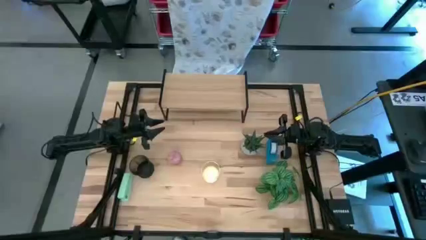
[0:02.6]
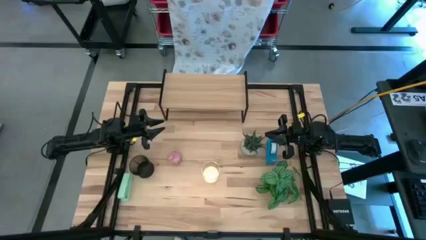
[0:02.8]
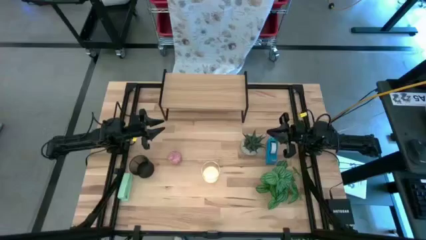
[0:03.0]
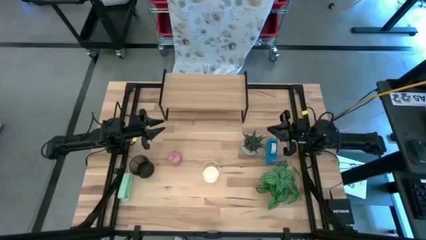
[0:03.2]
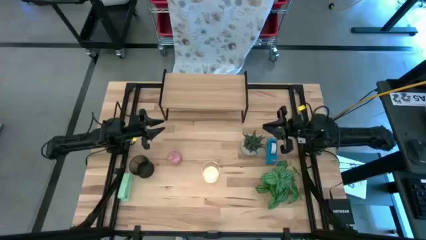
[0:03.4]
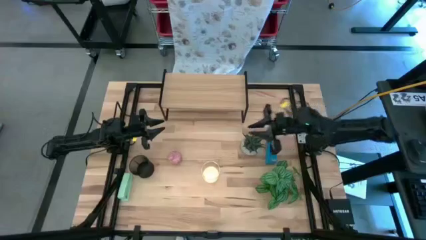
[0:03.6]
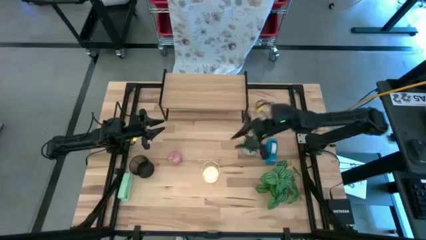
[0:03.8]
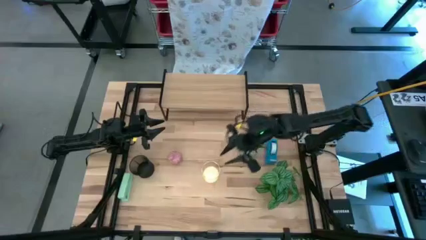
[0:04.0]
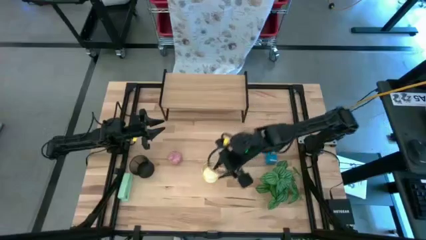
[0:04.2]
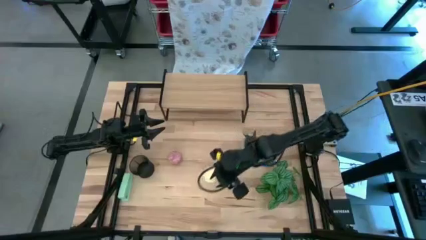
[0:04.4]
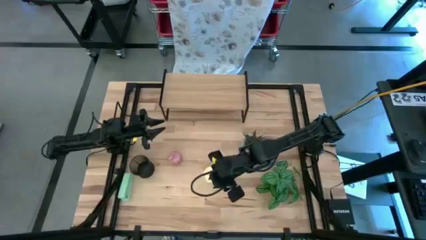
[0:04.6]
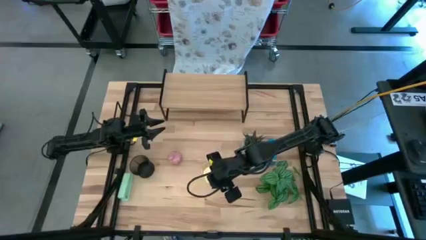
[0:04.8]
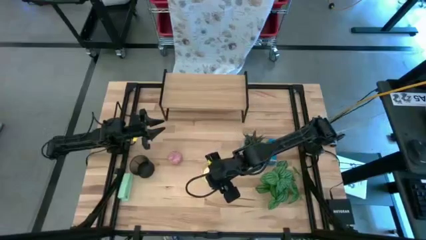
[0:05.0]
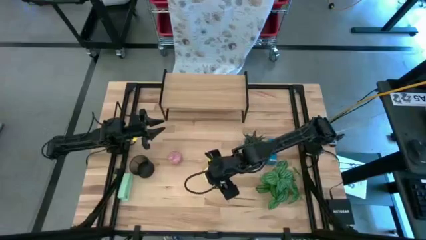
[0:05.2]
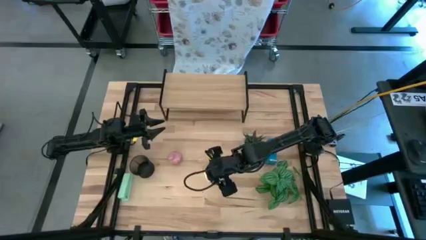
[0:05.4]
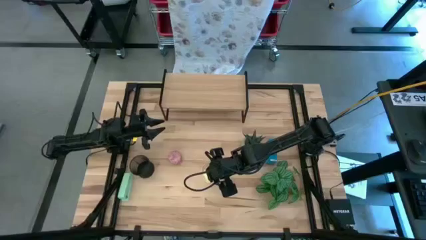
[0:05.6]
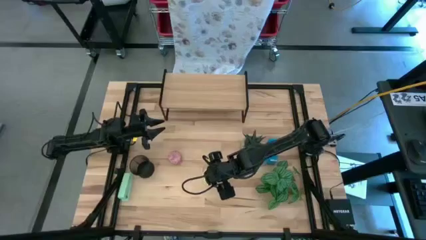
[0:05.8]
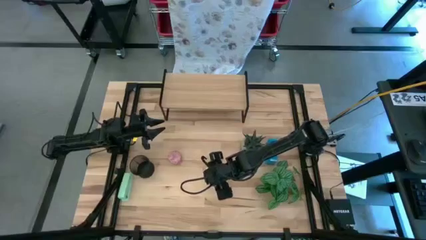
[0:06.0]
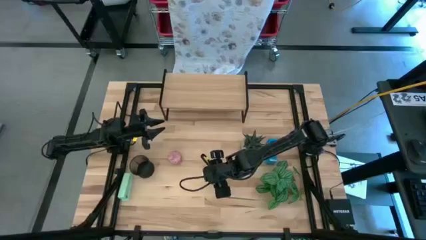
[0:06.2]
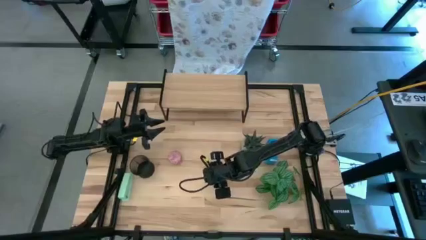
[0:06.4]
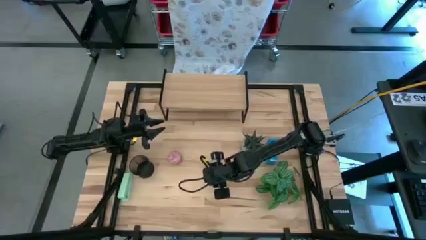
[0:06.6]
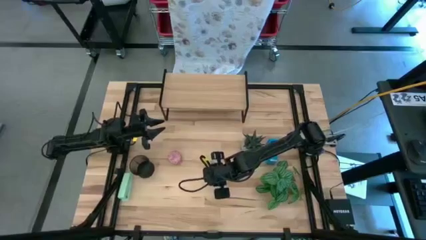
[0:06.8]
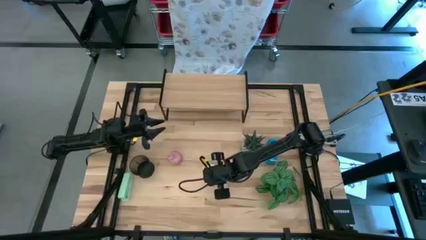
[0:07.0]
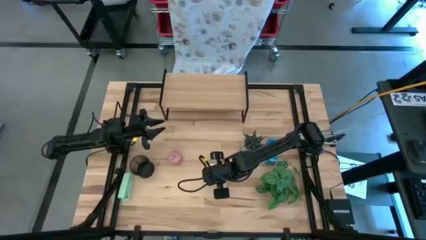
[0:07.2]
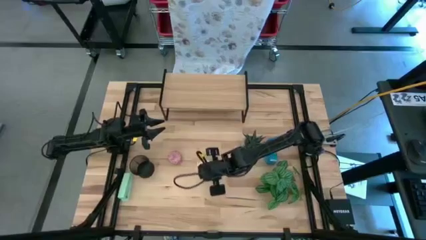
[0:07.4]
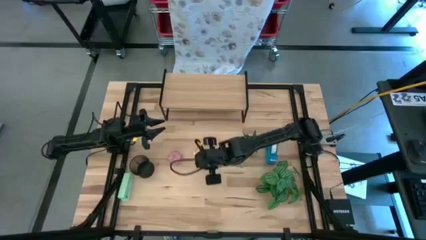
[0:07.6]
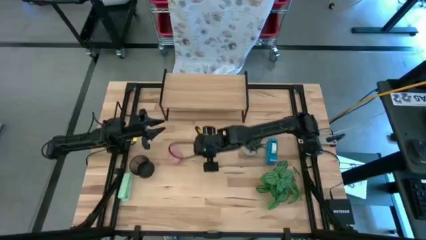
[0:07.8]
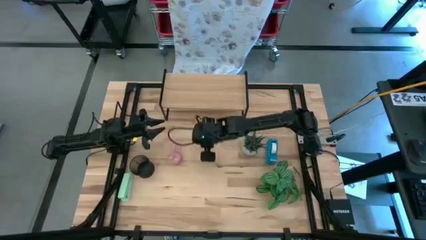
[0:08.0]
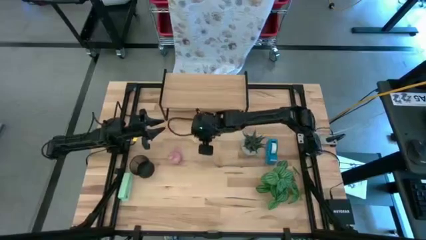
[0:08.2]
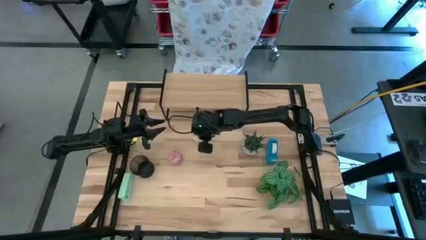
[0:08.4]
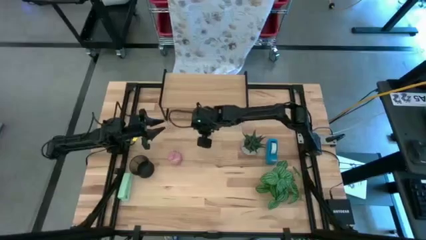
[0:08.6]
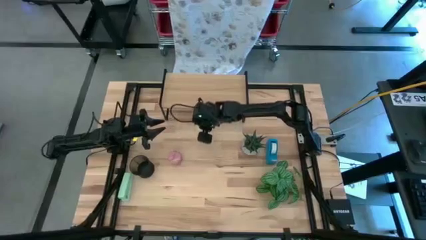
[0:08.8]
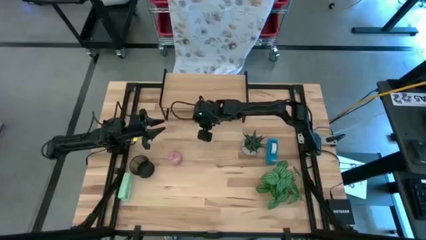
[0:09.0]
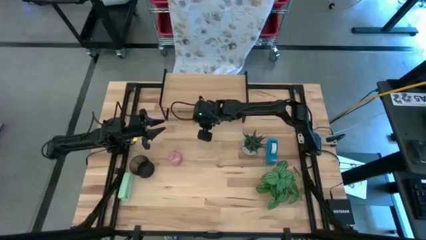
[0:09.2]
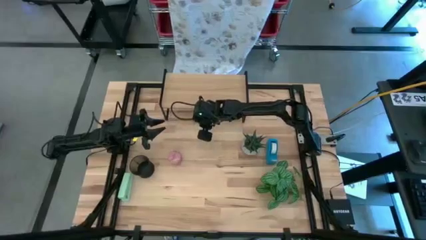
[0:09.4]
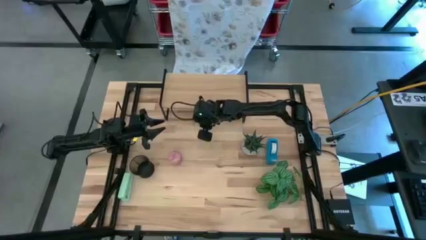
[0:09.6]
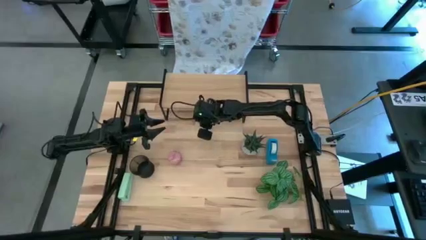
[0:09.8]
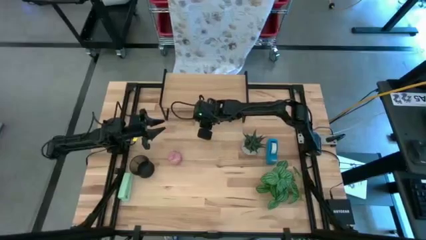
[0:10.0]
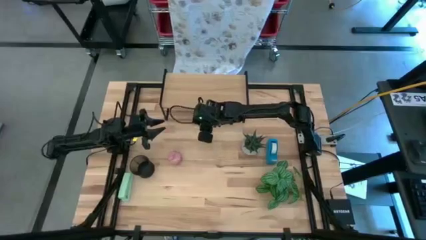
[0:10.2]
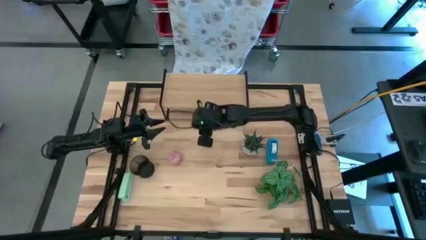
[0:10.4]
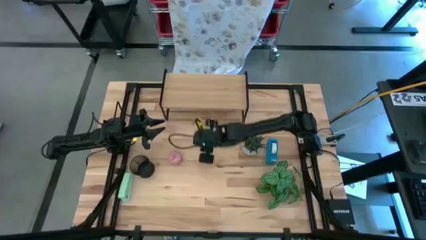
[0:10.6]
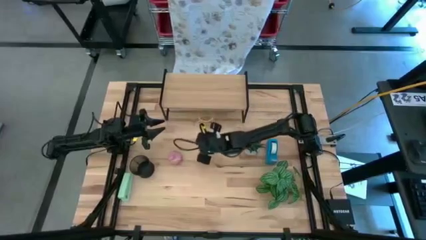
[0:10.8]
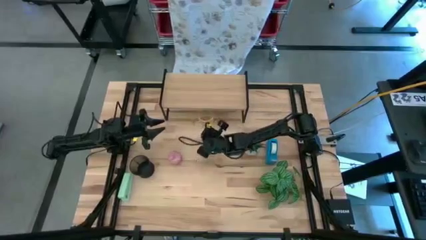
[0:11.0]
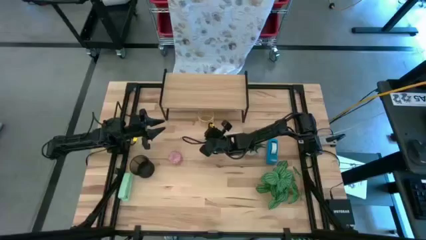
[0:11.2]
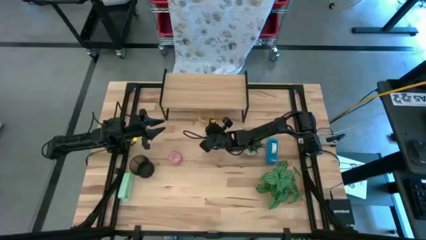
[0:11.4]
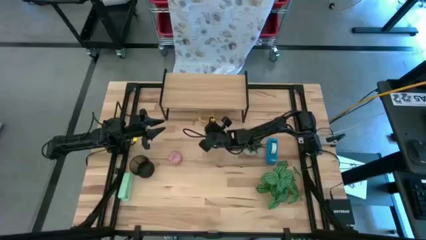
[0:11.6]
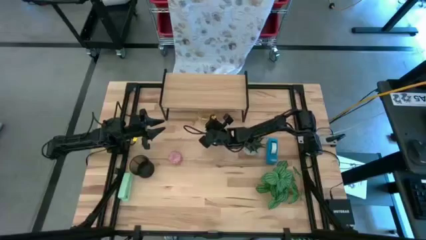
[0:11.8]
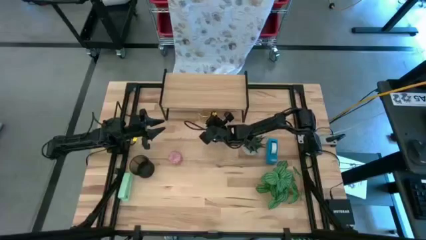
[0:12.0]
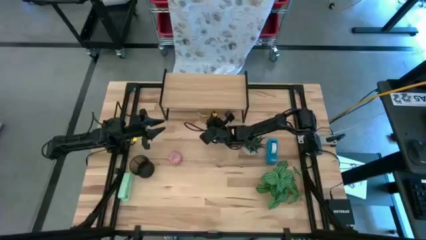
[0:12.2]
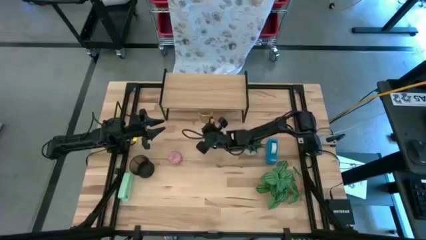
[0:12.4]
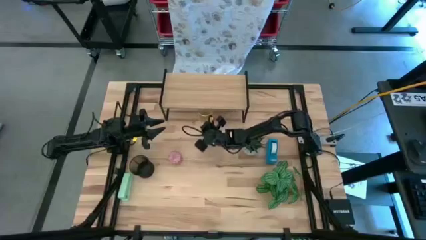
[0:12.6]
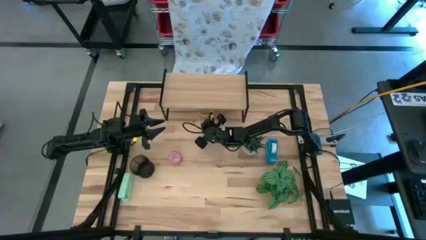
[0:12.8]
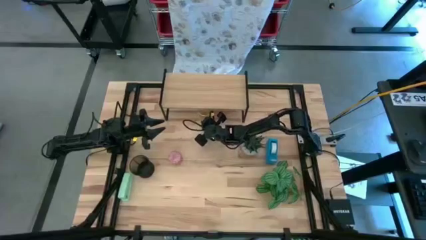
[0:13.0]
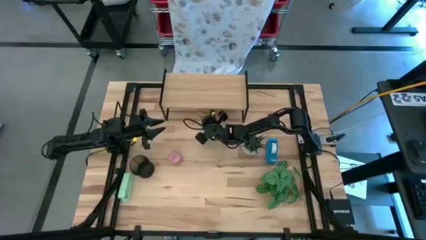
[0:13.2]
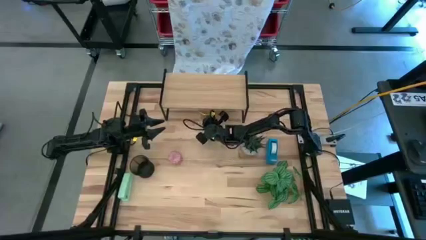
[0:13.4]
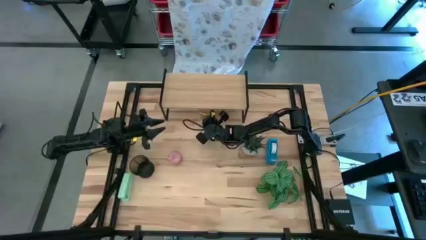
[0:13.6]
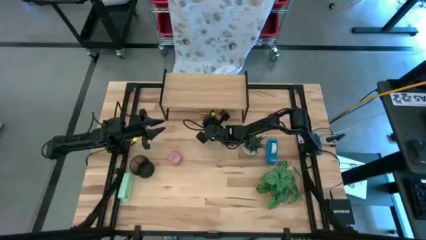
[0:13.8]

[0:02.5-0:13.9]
Task: Stock shelves
Put the gold pen holder under the shelf

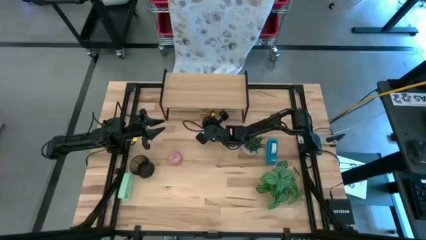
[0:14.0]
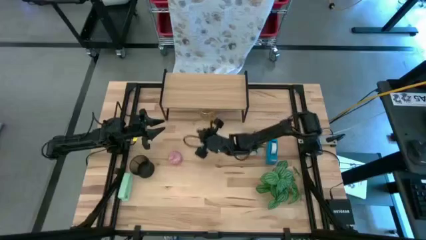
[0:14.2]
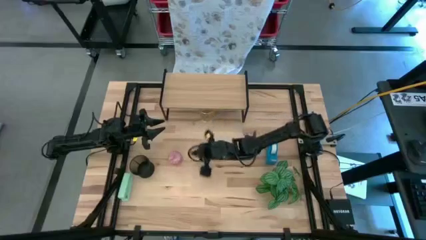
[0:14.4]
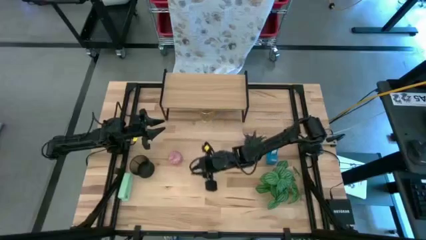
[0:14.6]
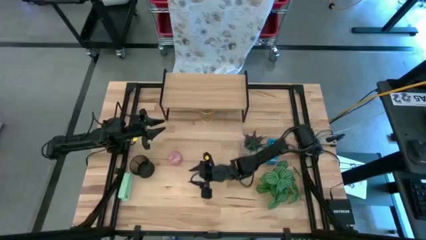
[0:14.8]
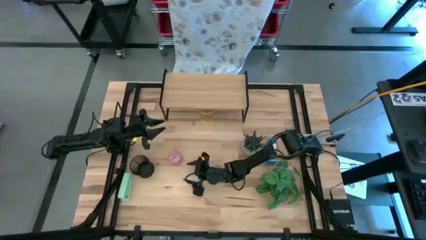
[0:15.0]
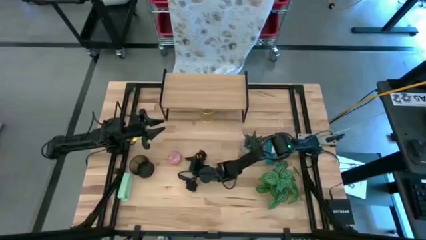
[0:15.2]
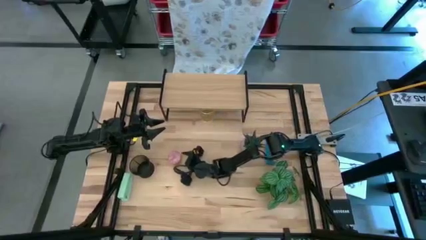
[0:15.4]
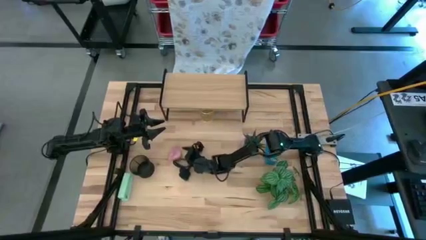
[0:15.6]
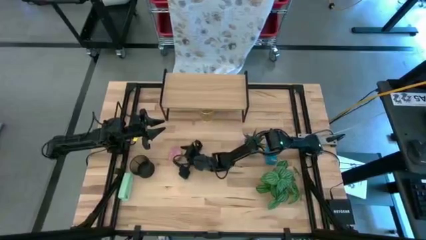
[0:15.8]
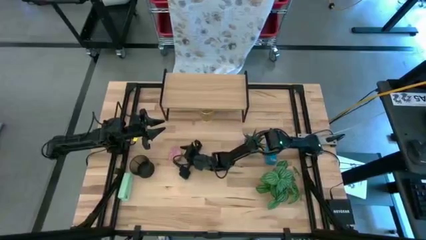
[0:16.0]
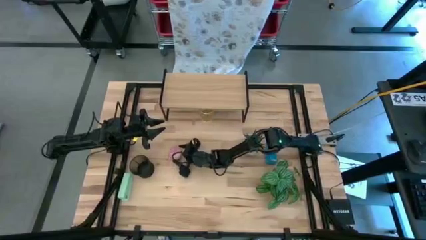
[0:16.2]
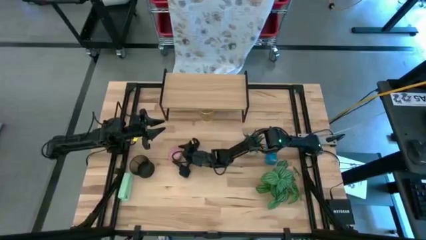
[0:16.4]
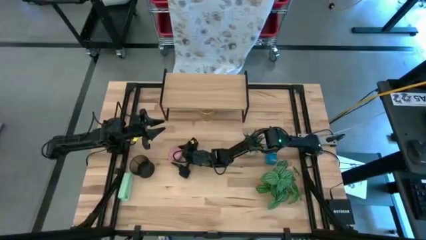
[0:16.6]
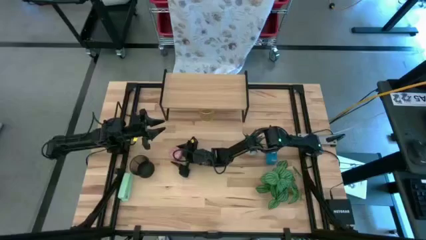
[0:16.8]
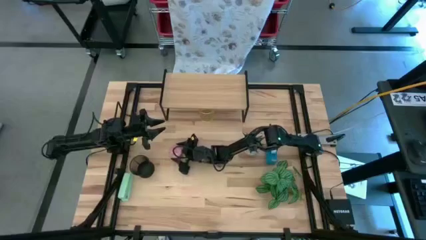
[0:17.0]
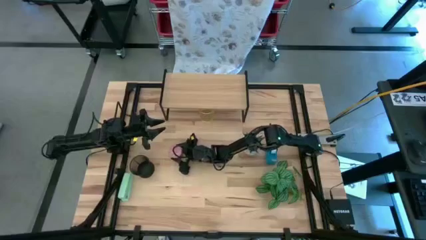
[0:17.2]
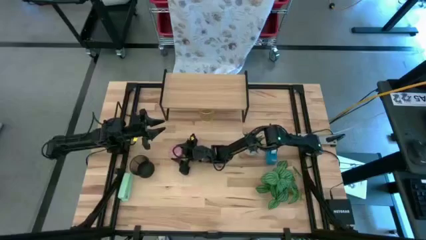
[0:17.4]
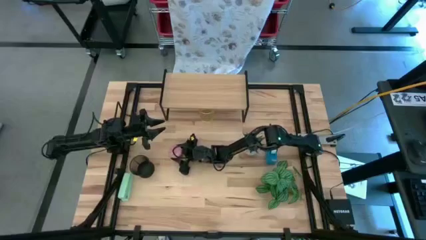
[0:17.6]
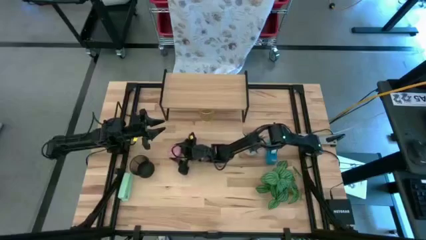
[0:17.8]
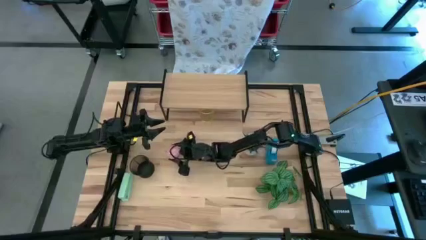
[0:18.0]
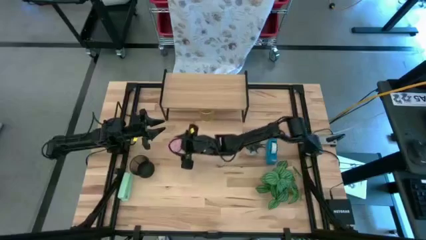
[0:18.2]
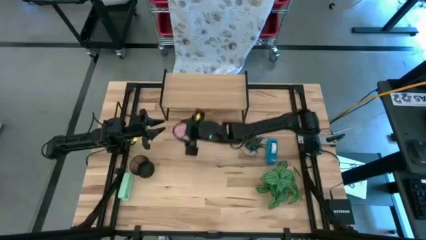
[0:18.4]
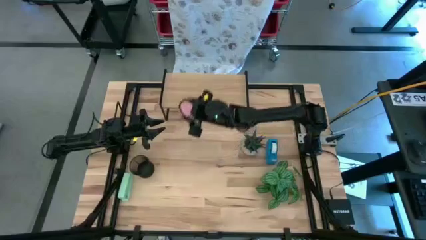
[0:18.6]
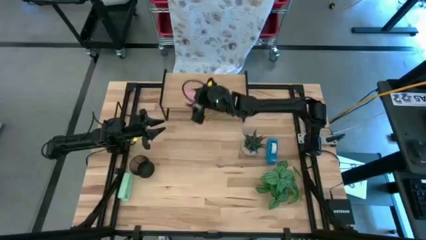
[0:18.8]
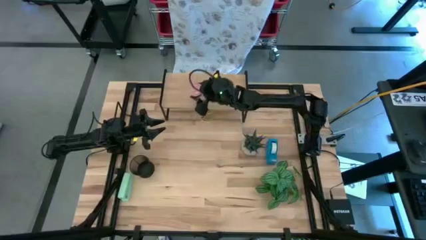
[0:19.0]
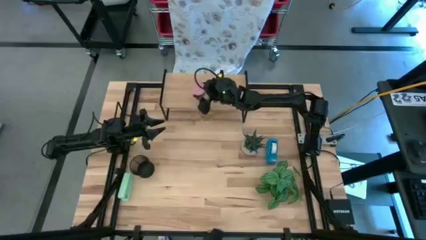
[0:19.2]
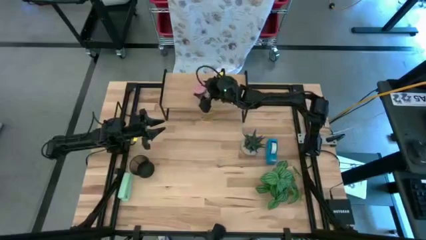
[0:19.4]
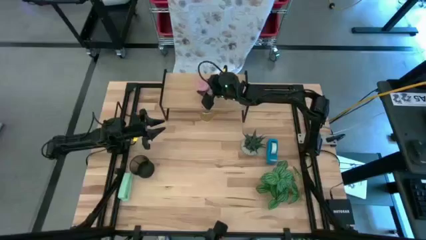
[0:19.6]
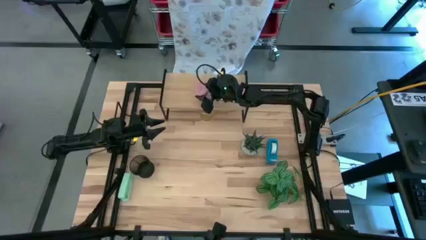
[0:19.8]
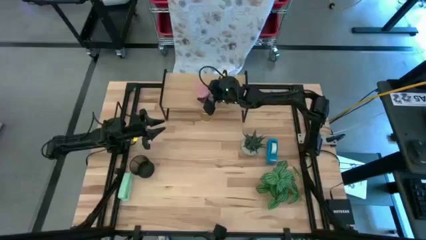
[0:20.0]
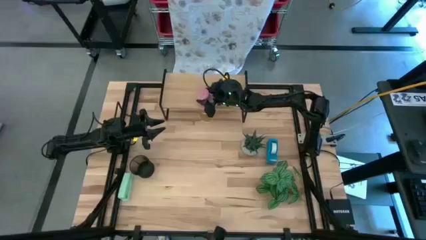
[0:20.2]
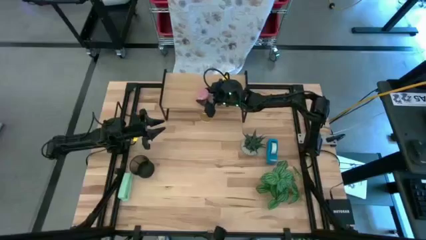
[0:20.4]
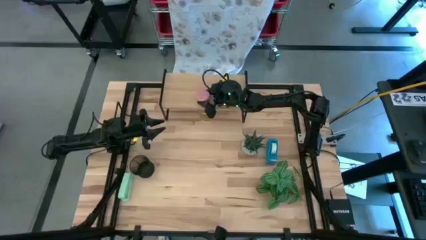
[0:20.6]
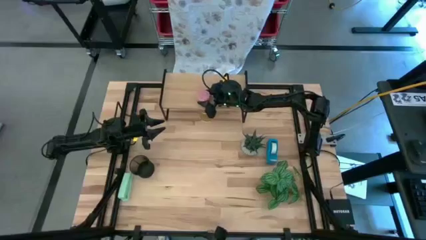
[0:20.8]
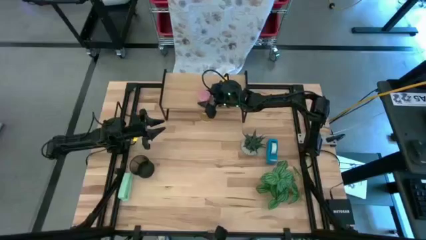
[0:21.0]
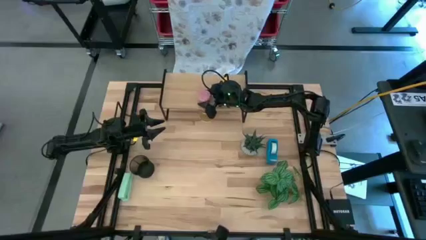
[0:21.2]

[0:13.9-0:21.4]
Put the pink scented candle on the shelf
